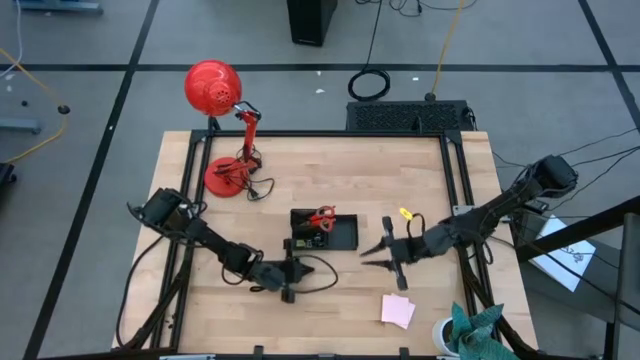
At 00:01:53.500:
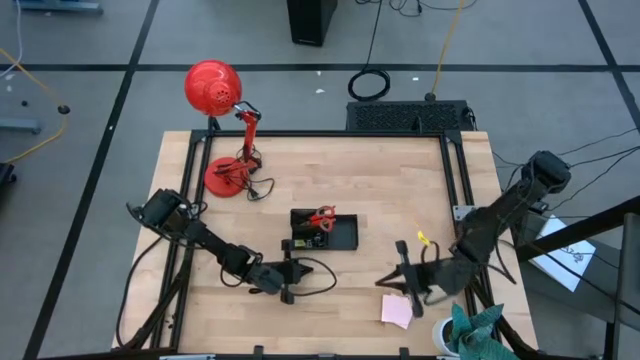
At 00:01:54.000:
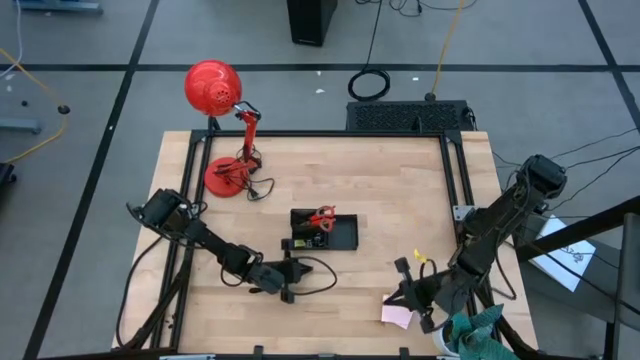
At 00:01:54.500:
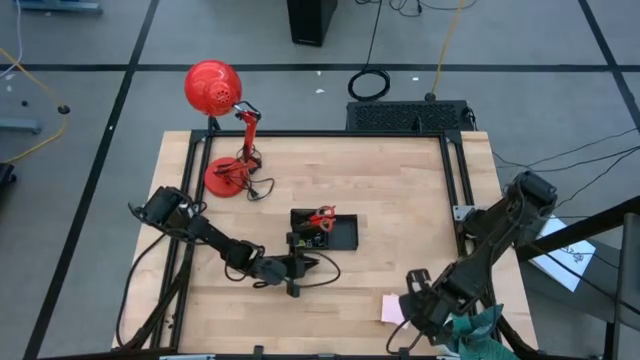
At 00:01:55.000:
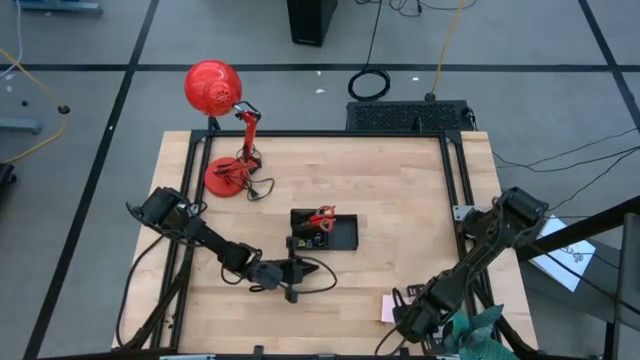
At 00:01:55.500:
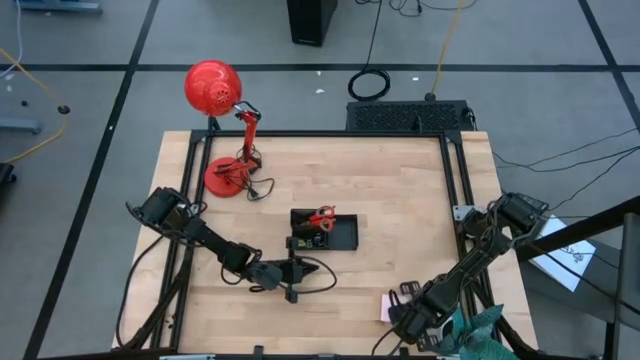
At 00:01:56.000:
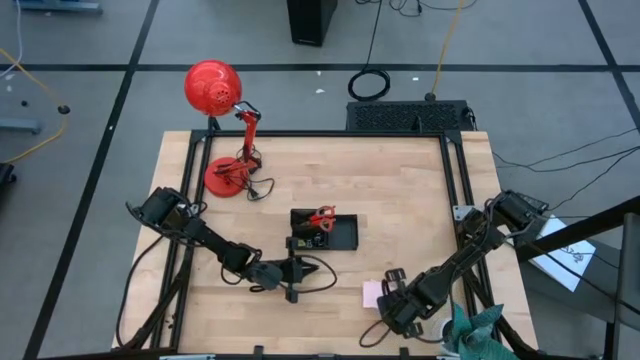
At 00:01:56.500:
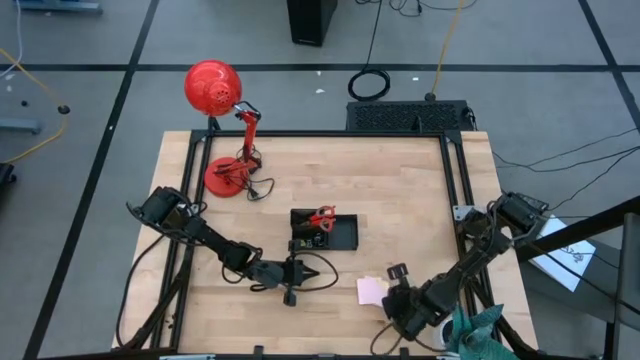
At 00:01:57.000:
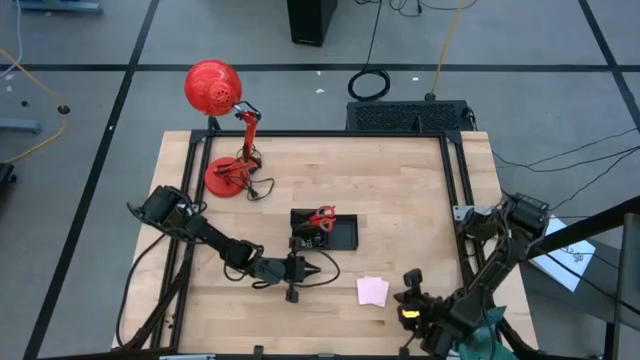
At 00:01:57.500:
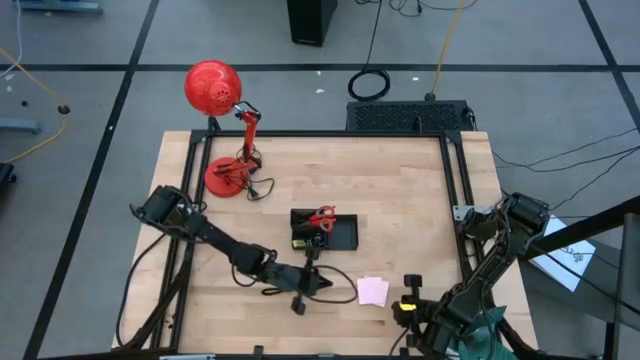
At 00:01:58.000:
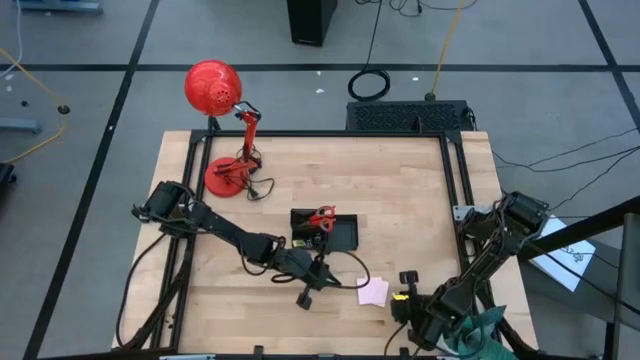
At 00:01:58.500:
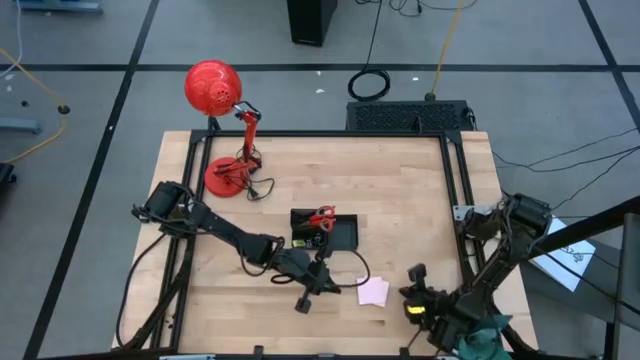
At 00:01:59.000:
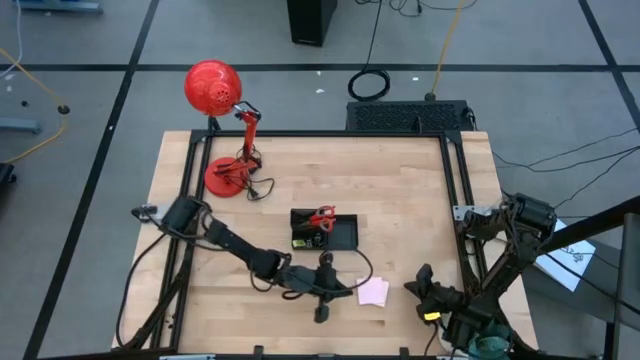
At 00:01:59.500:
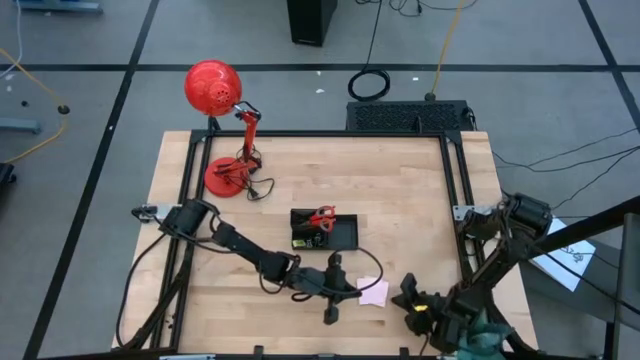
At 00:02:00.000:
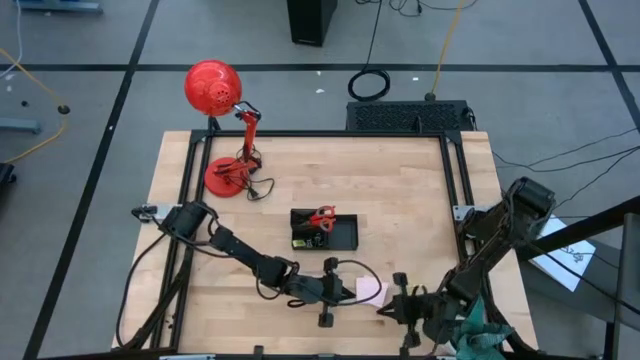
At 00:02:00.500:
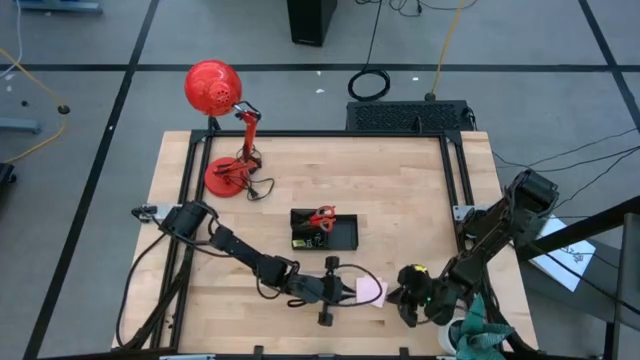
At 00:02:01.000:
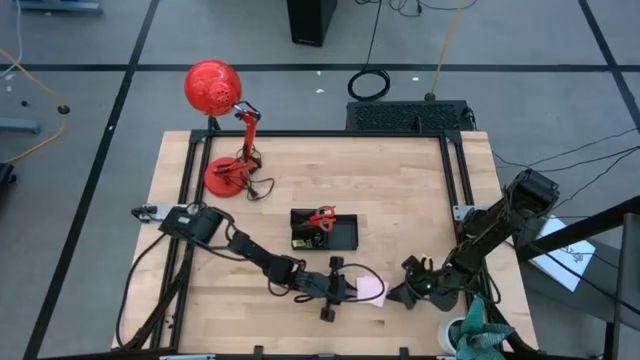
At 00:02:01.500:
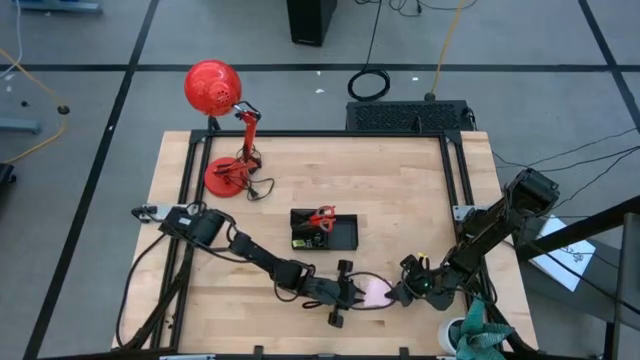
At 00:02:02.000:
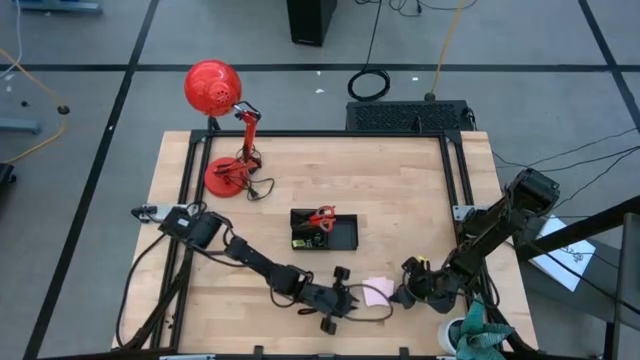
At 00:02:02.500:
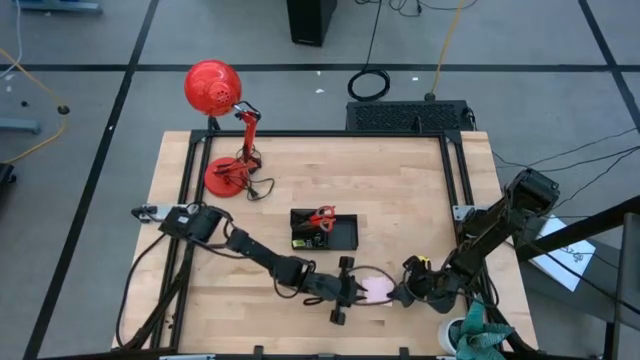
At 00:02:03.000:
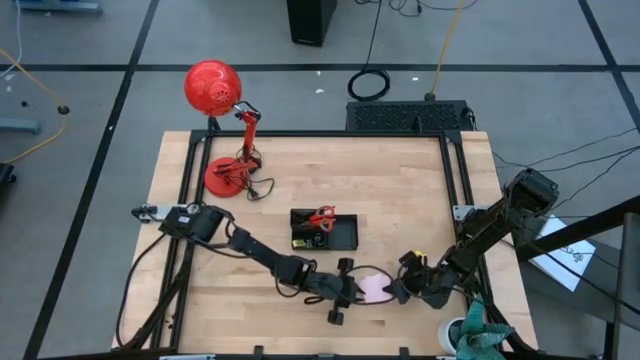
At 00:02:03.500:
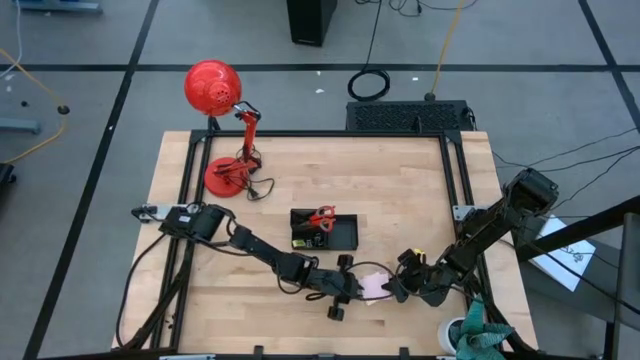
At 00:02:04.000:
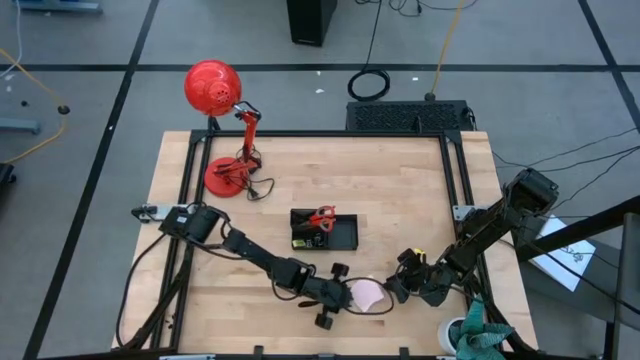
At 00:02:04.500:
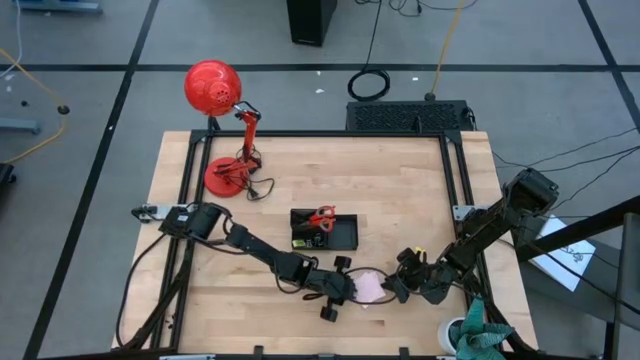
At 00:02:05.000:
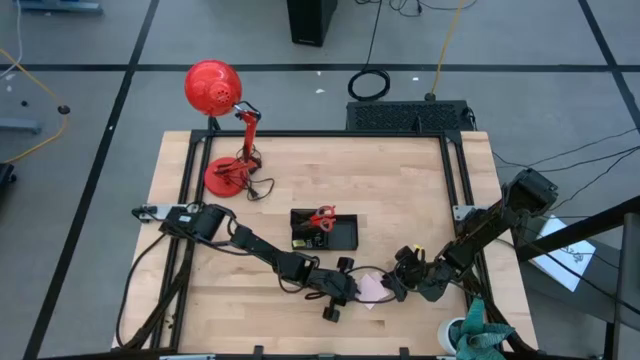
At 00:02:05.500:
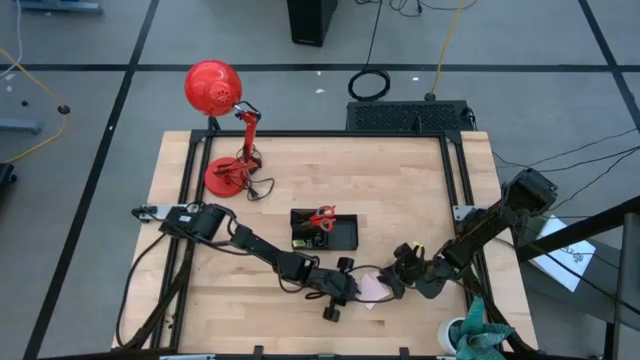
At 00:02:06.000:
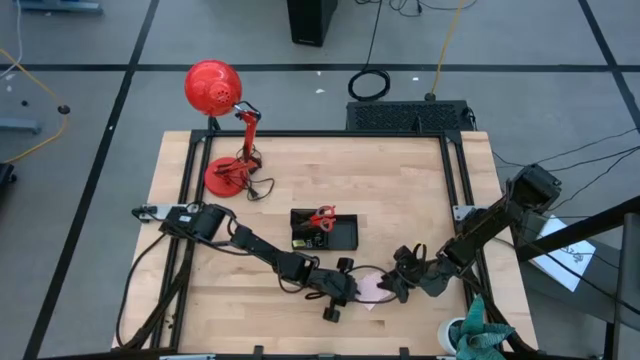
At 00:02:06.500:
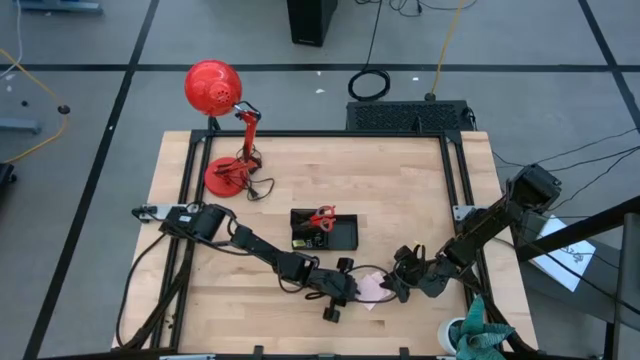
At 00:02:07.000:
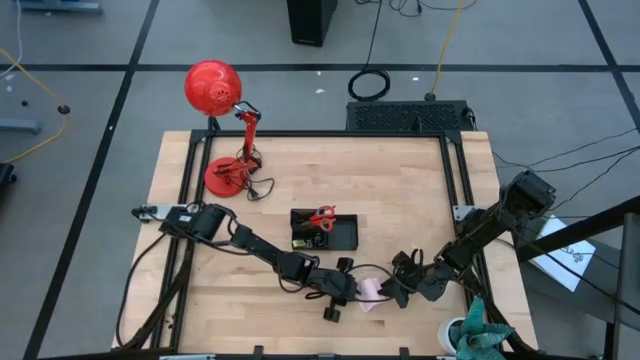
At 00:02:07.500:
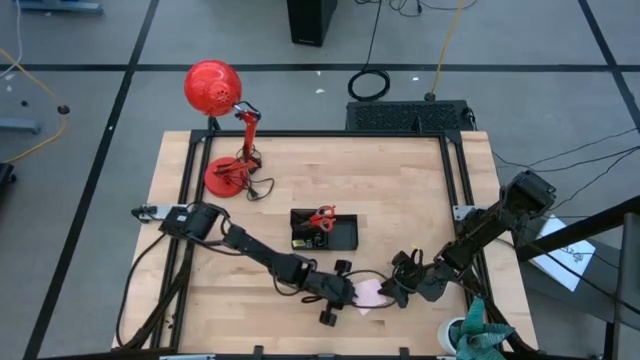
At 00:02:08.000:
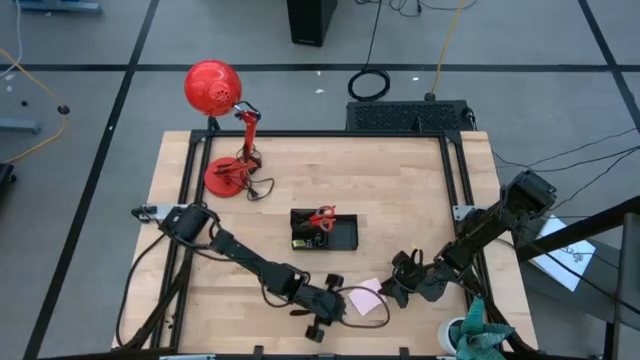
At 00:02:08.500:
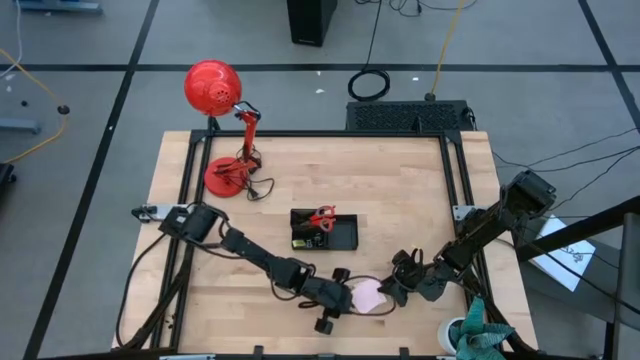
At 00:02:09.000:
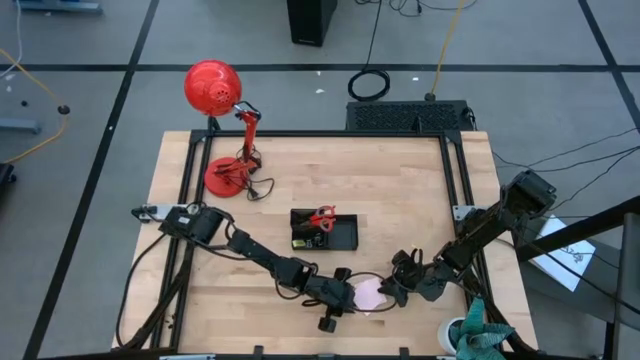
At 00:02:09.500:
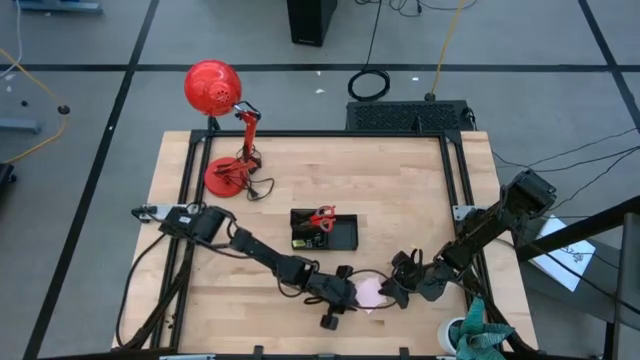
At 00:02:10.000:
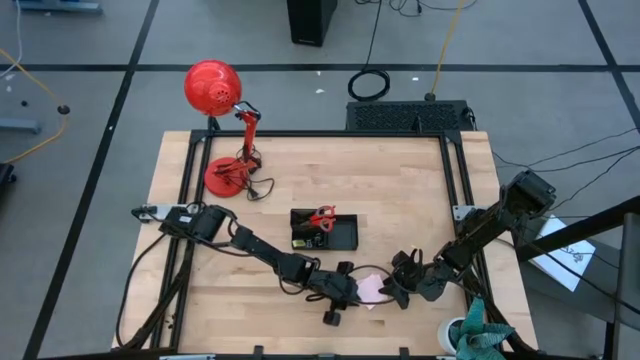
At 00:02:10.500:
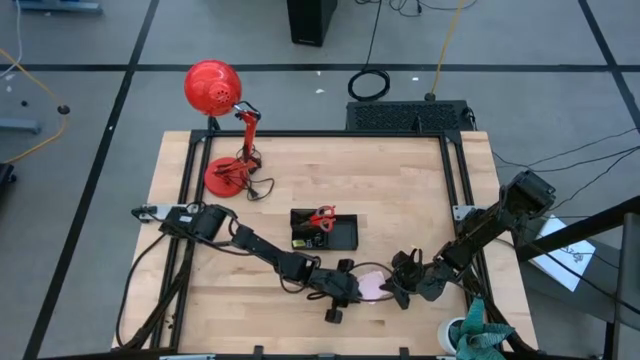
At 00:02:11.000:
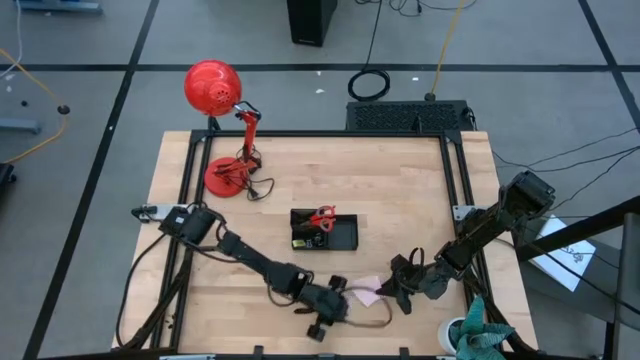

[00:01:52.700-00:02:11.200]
Task: Pick and place office supplies into organizer
Put the sticky note into the desk organizer

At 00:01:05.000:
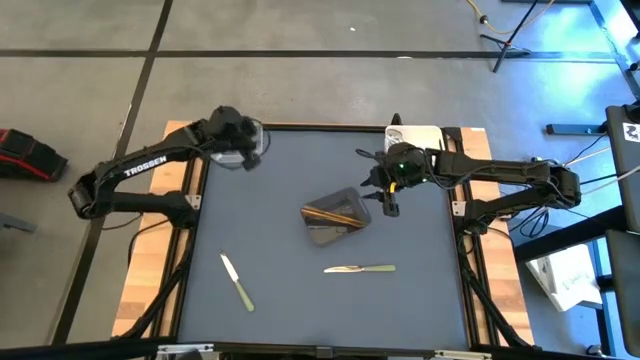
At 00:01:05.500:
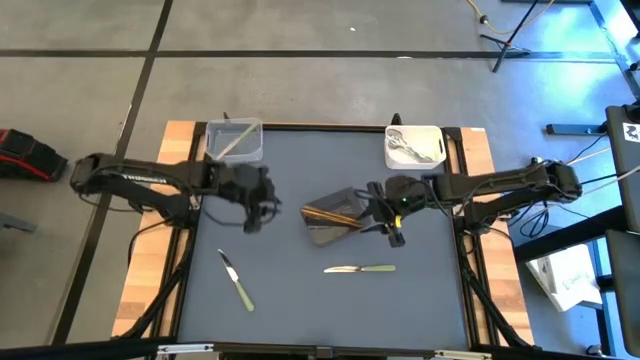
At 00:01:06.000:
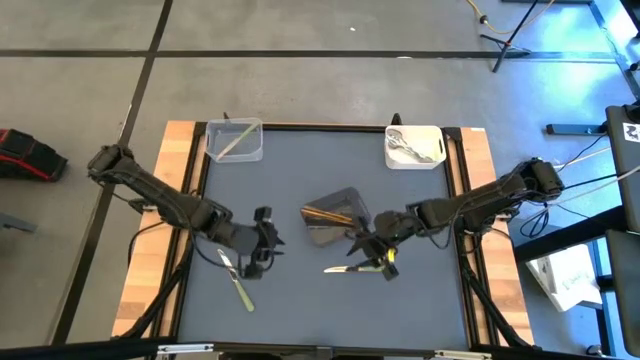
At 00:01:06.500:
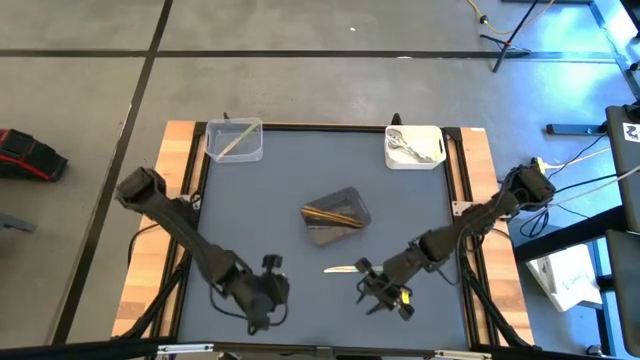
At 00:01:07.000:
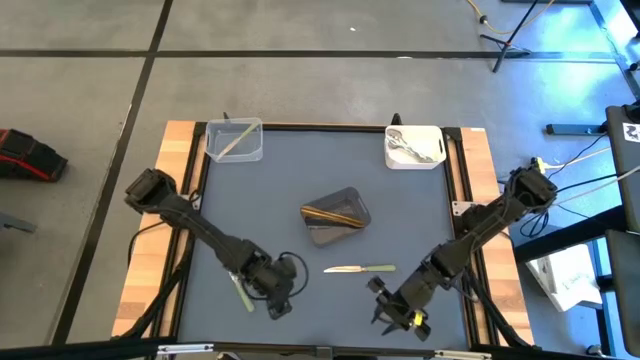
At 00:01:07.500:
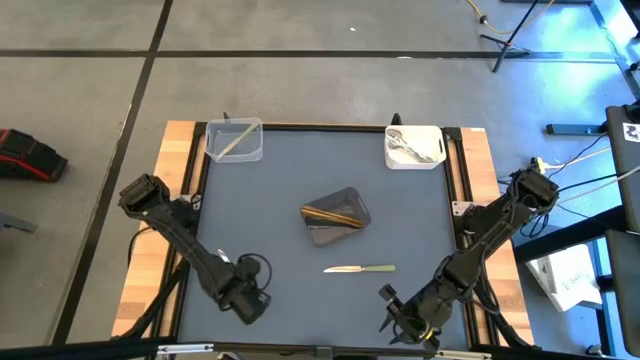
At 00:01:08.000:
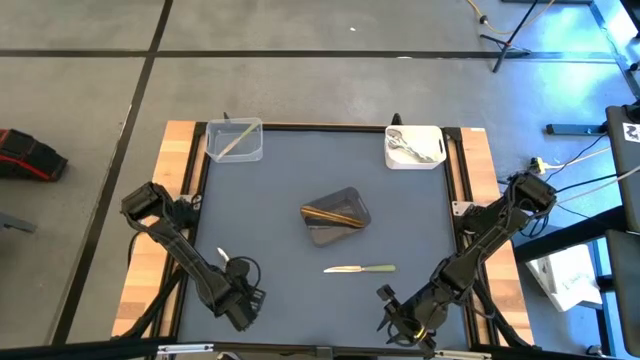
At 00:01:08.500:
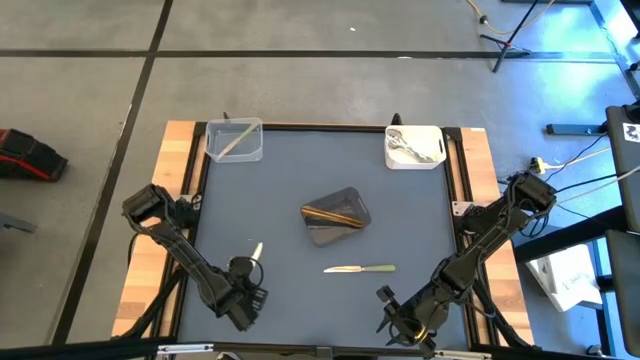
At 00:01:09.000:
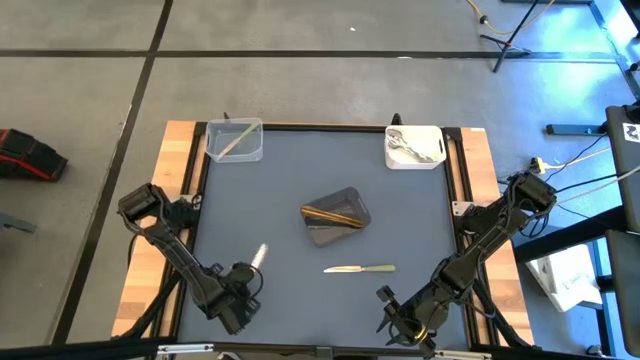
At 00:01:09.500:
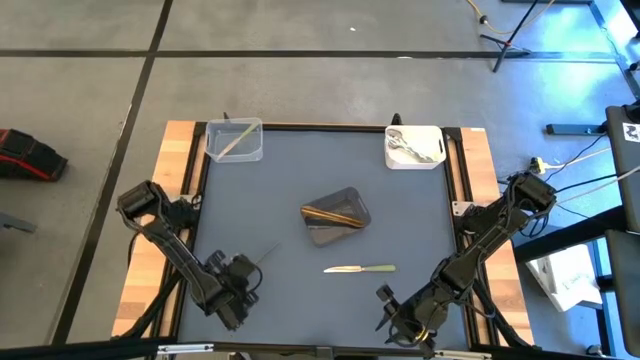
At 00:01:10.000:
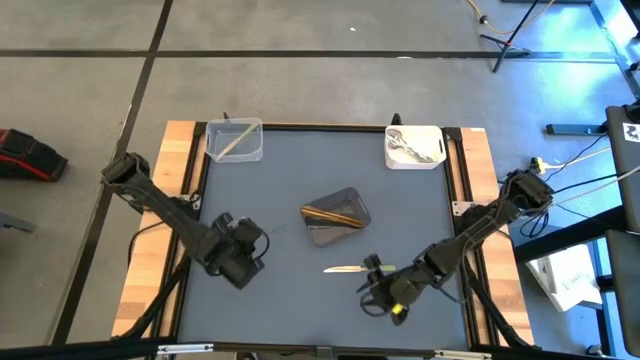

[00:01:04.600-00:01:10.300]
Task: Sort silverware by color (type)
Put the green table knife into the transparent bin
